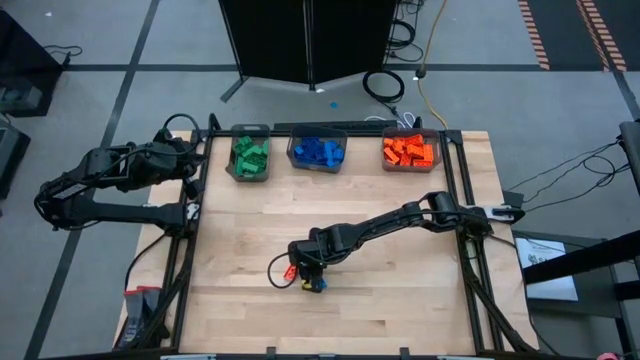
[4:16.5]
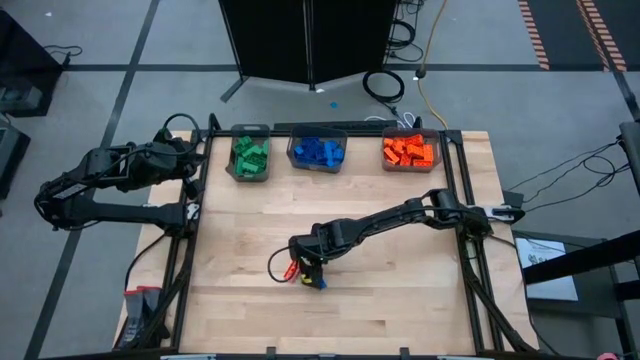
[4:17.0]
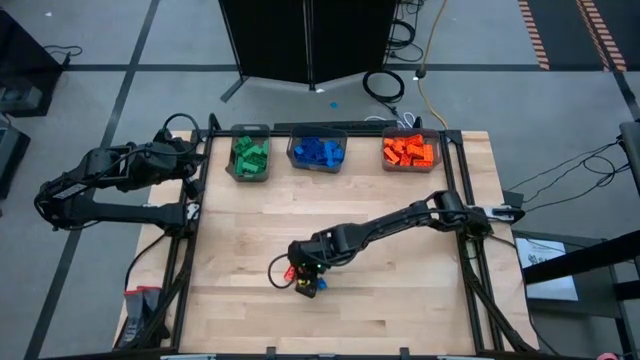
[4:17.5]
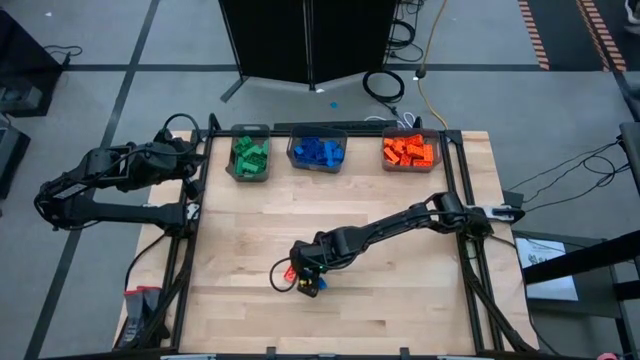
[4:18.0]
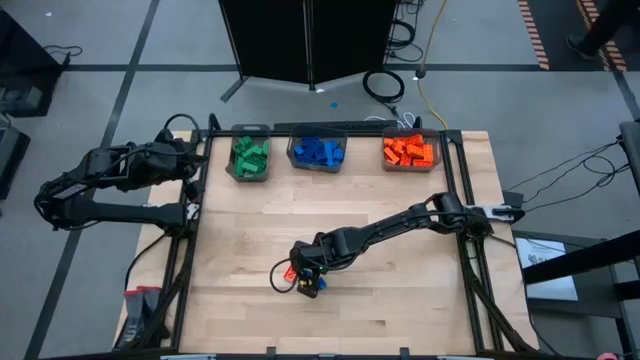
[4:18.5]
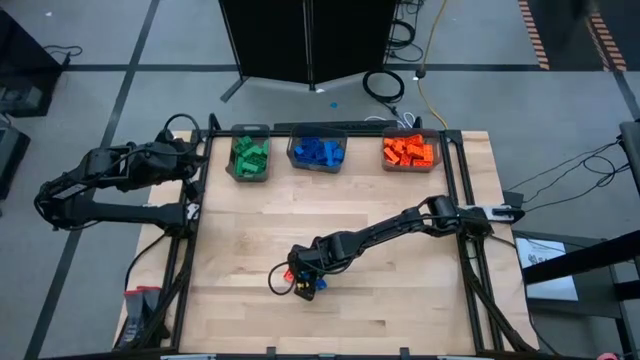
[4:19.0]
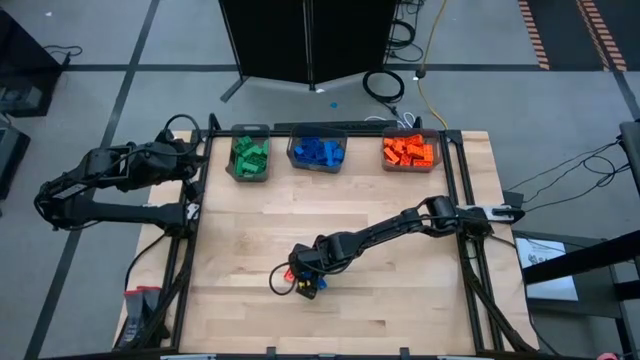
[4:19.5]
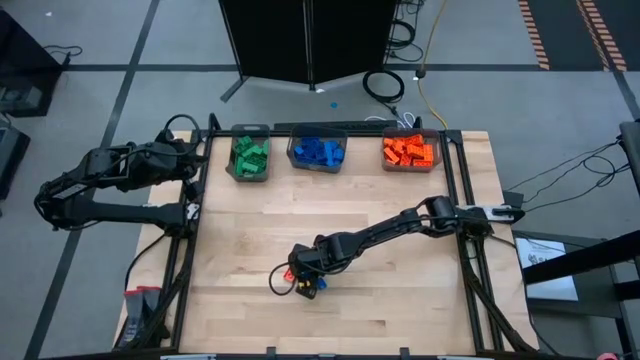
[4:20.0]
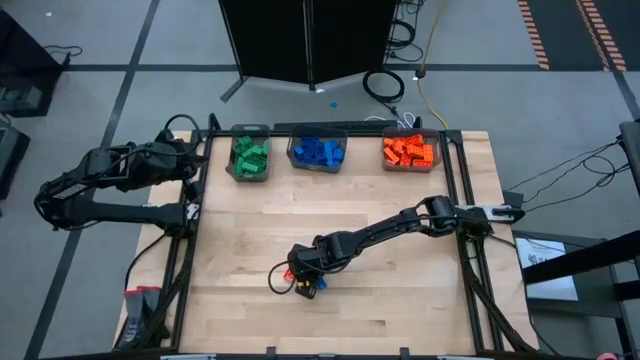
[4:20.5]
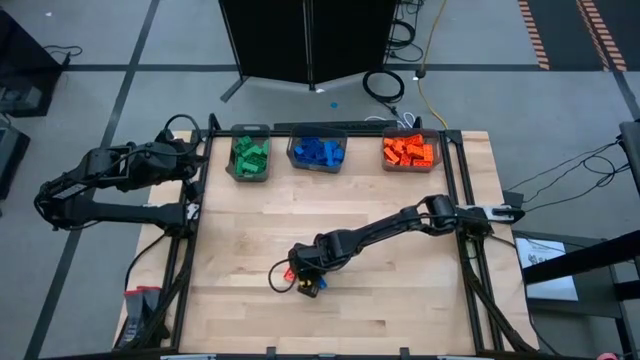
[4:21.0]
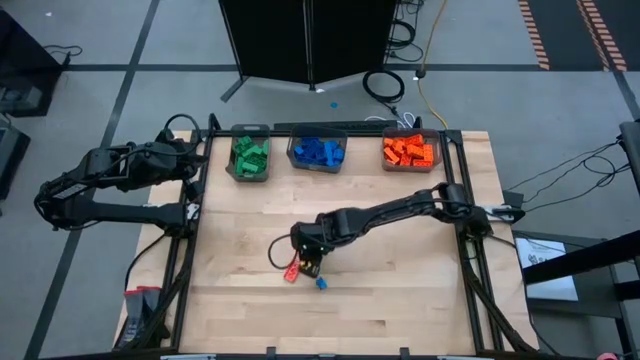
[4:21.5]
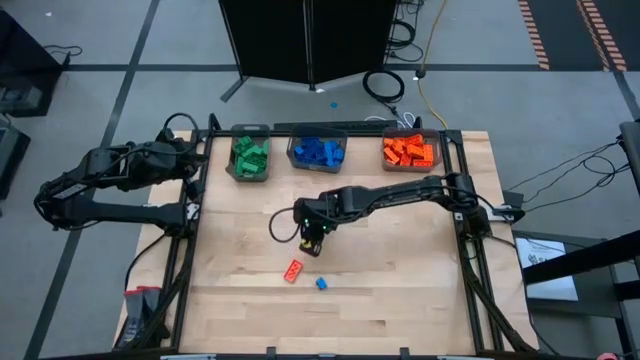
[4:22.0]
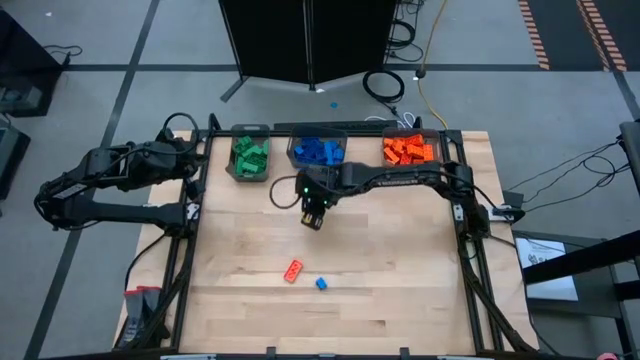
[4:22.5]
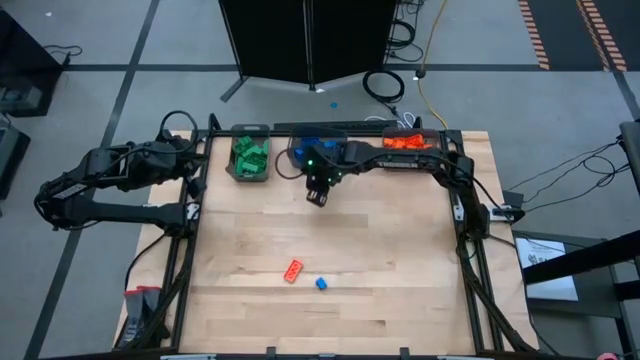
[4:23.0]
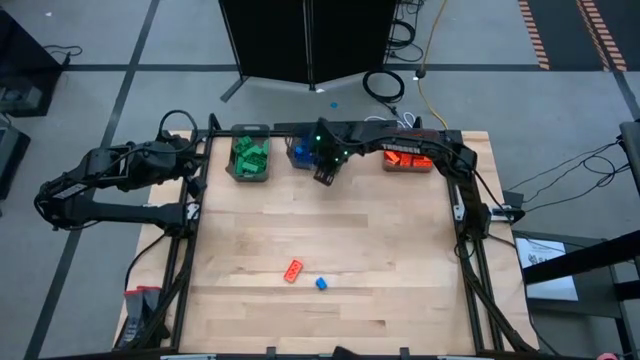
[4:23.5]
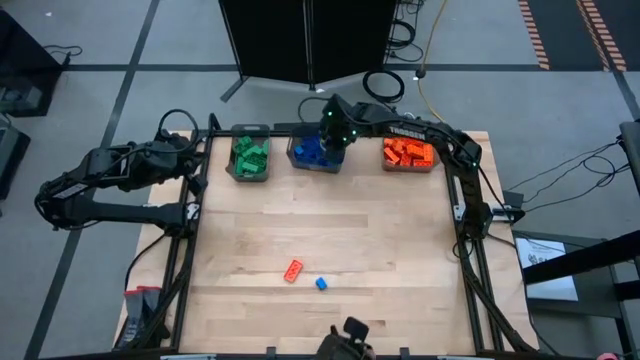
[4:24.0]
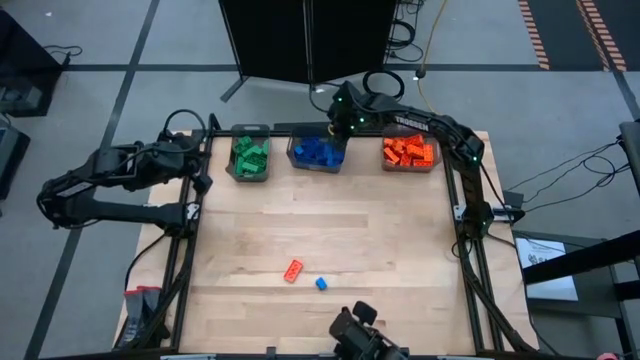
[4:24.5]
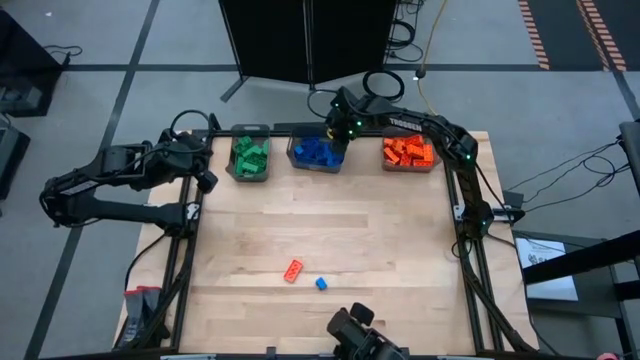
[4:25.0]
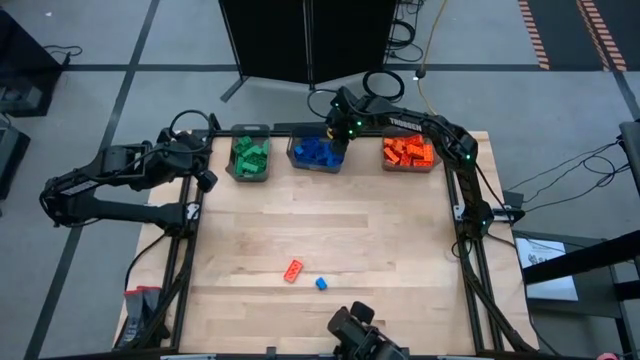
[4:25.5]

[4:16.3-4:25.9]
Task: Sort blocks
Put the blue game piece into the middle black bin

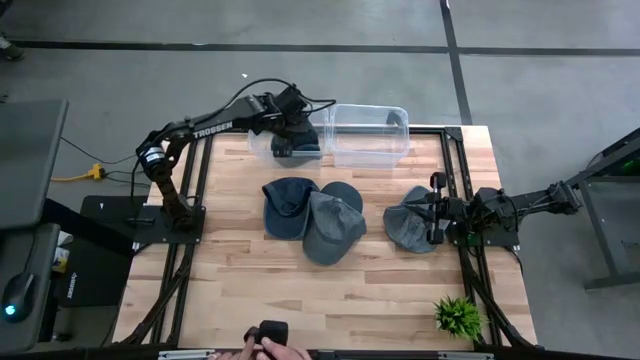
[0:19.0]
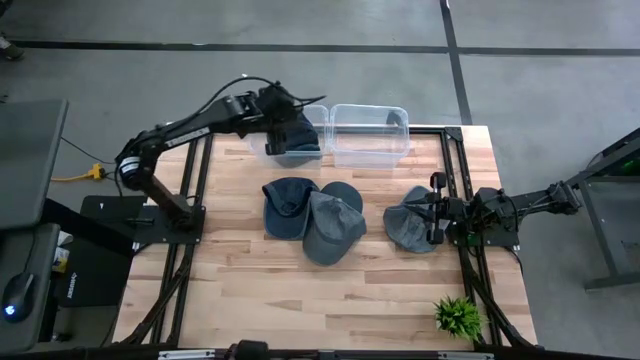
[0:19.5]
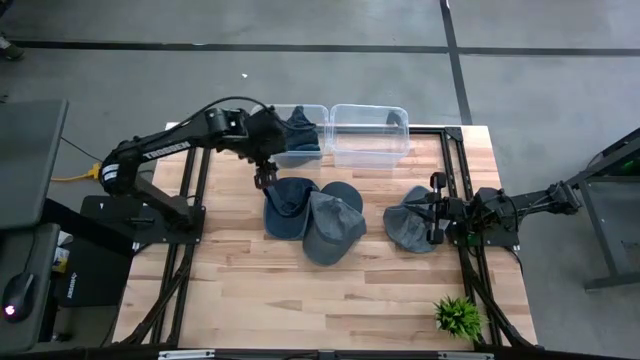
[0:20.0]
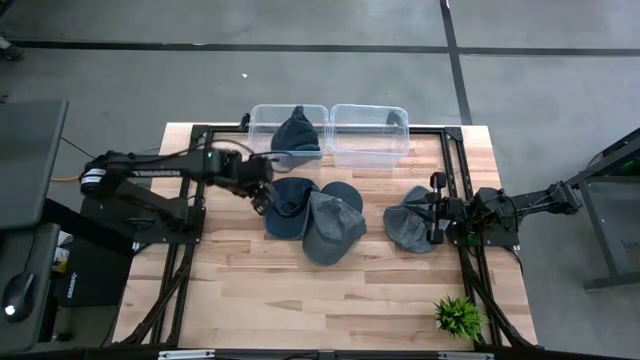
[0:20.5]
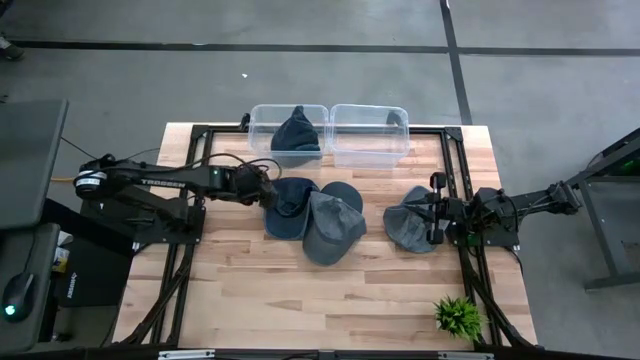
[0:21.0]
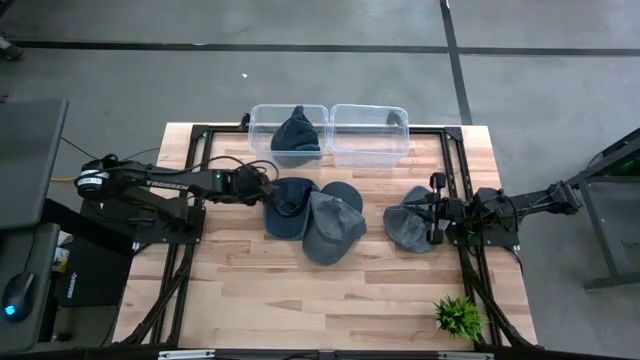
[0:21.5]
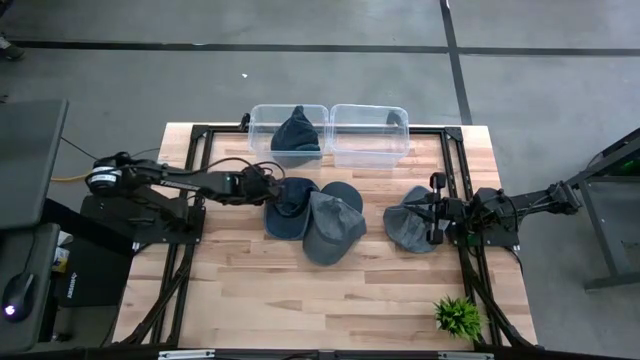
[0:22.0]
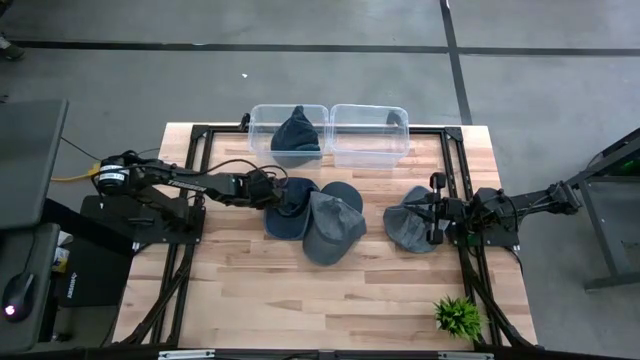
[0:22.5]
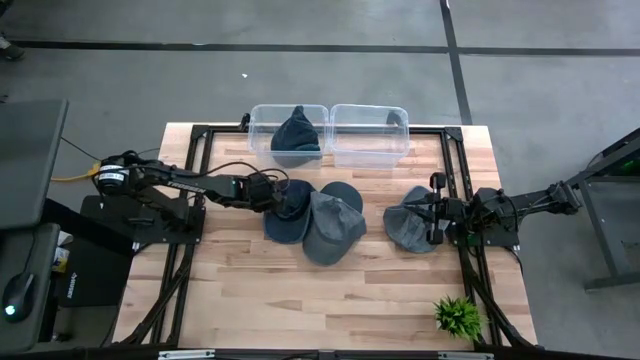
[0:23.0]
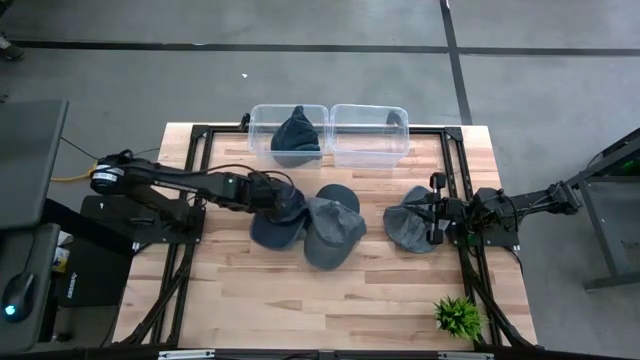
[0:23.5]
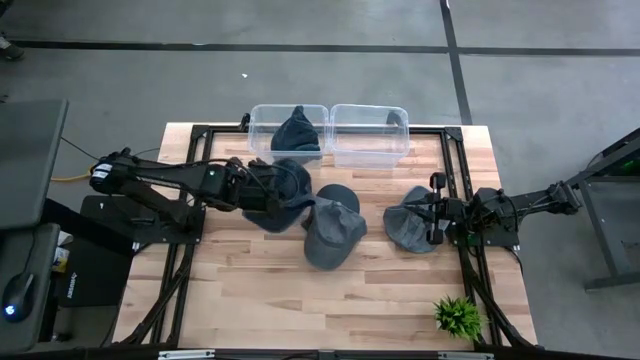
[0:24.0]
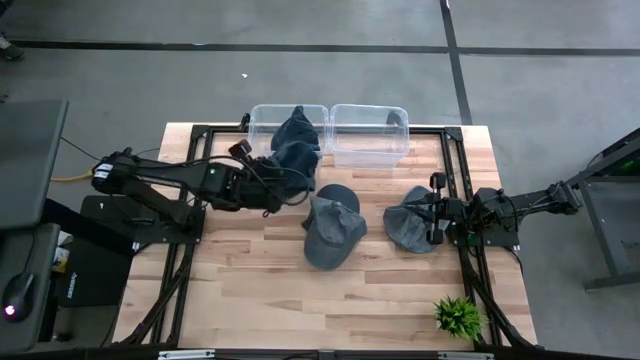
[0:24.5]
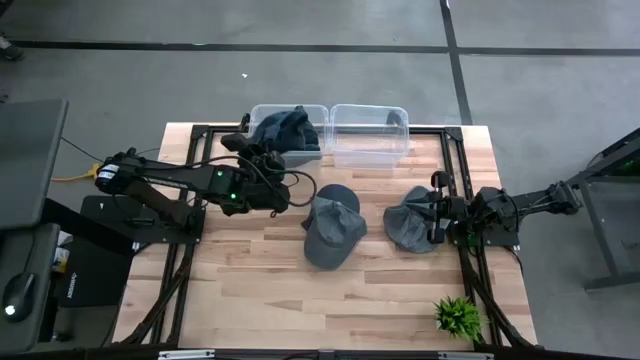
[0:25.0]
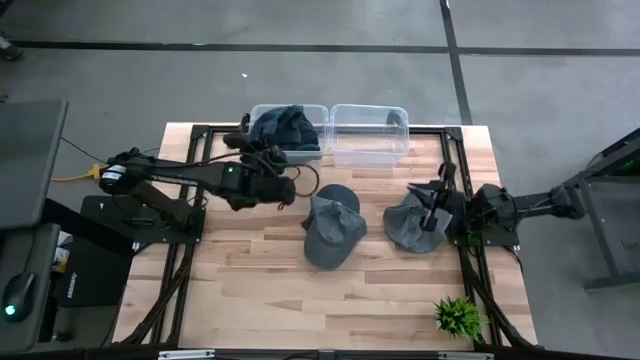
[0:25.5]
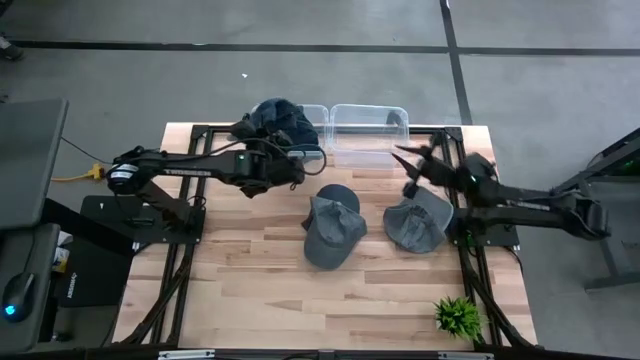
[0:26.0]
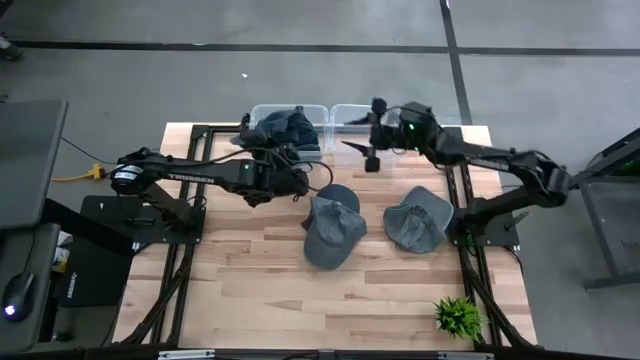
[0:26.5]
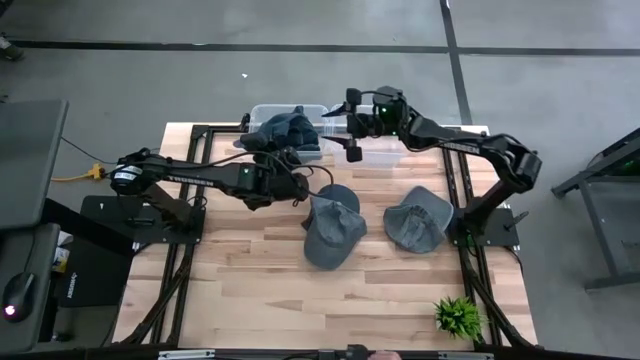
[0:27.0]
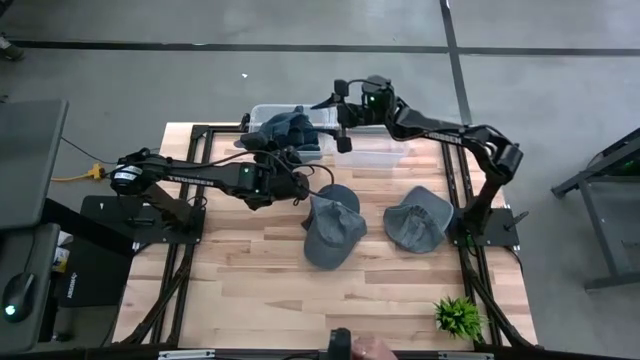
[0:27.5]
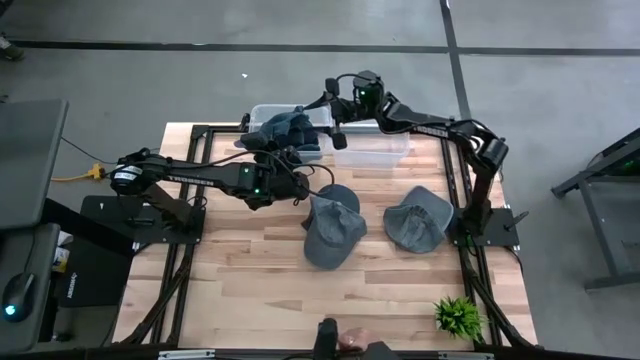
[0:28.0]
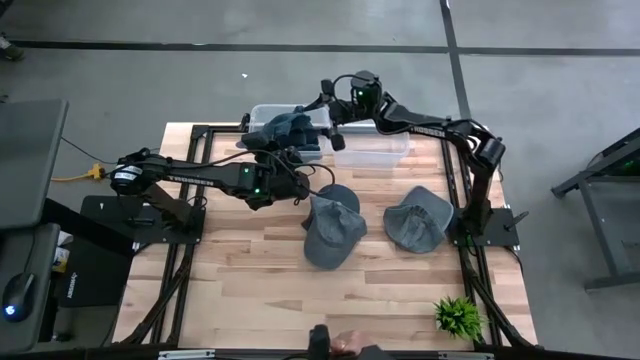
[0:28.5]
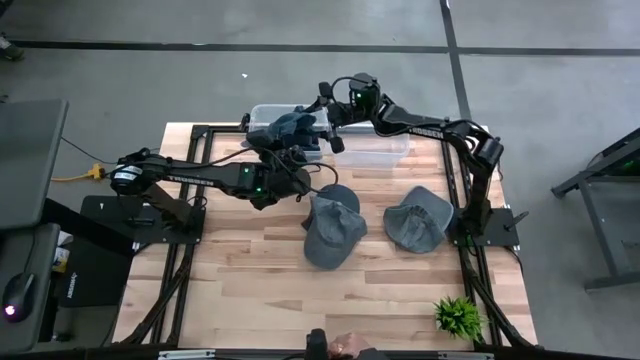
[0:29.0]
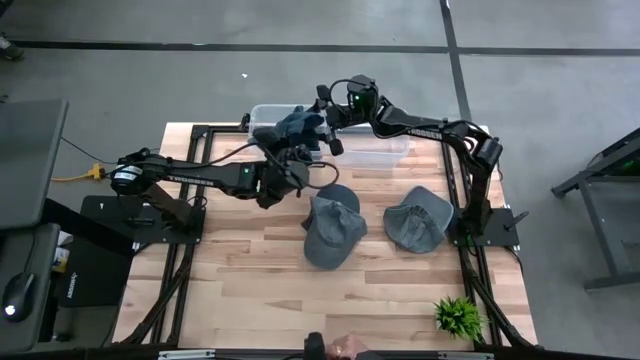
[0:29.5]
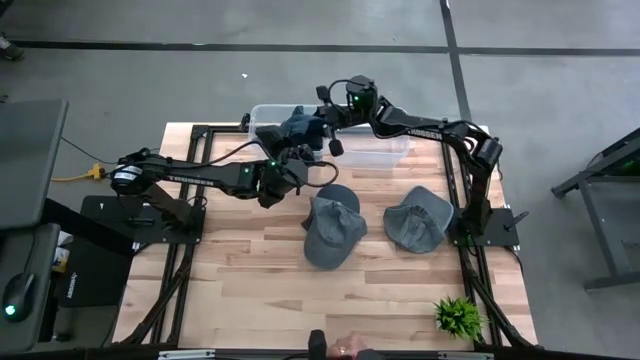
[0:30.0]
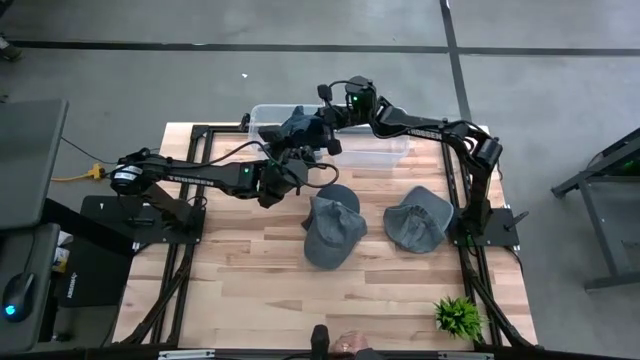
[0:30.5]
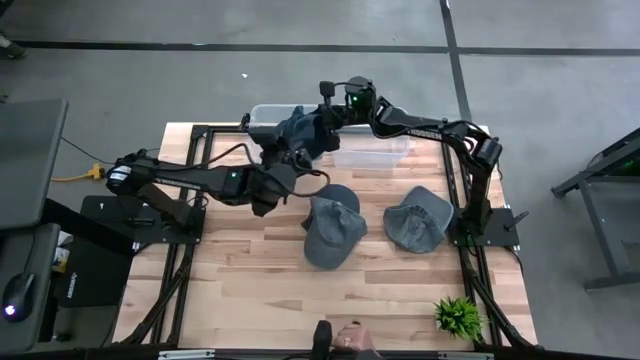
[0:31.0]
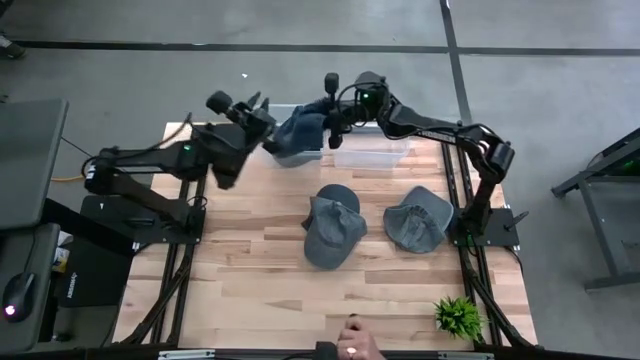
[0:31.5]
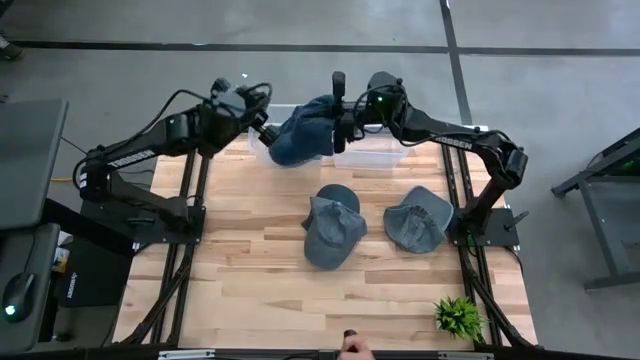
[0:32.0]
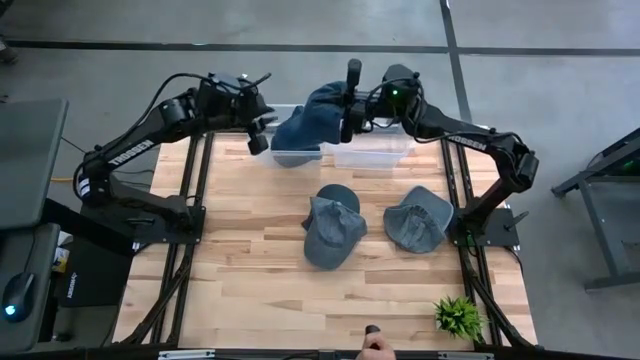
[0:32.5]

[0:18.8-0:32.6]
Task: Pick and place caps into container
Put the blue cap into the left transparent container
